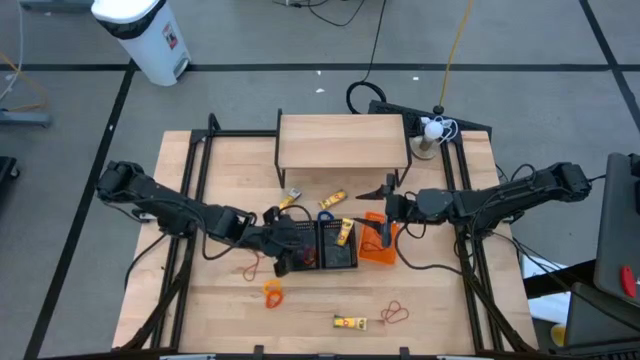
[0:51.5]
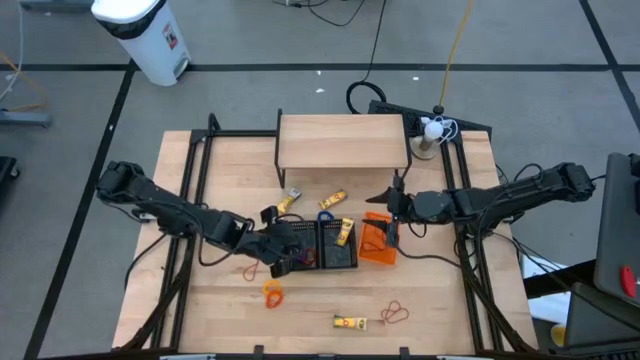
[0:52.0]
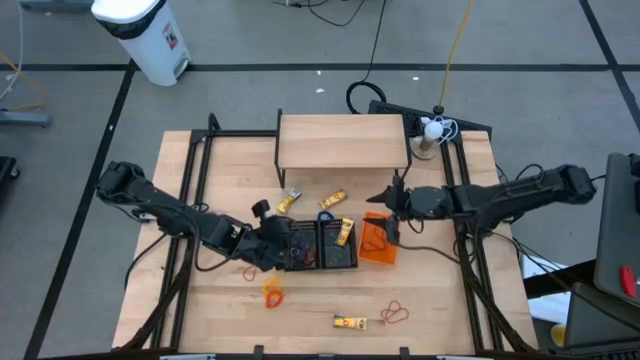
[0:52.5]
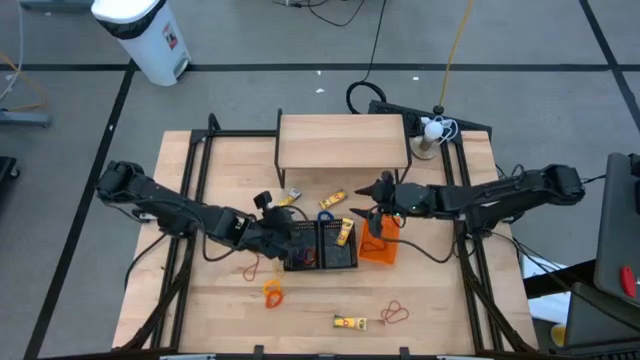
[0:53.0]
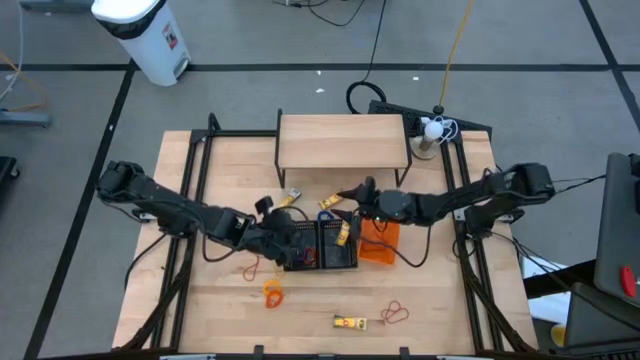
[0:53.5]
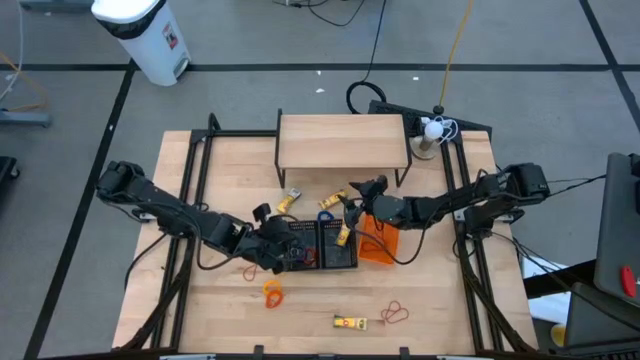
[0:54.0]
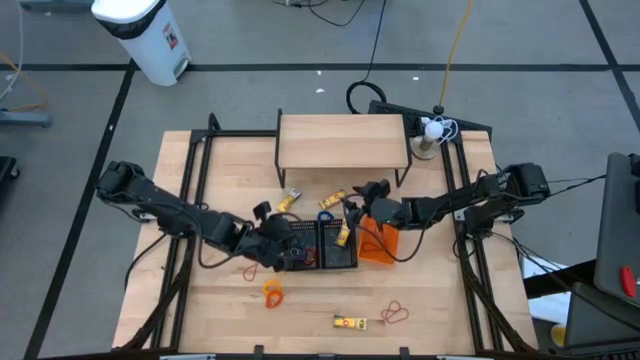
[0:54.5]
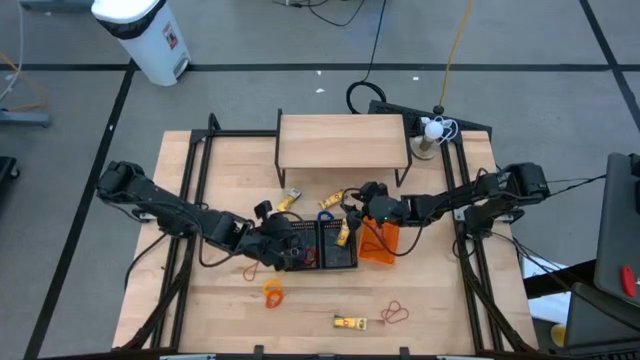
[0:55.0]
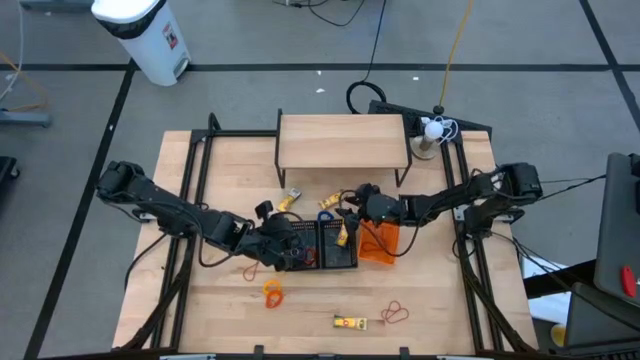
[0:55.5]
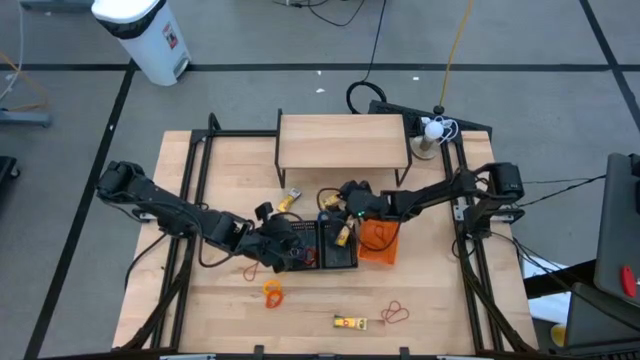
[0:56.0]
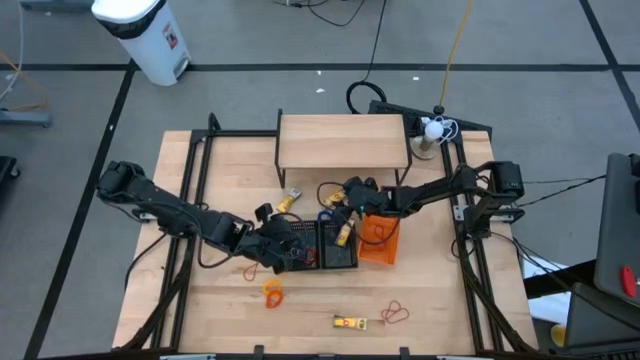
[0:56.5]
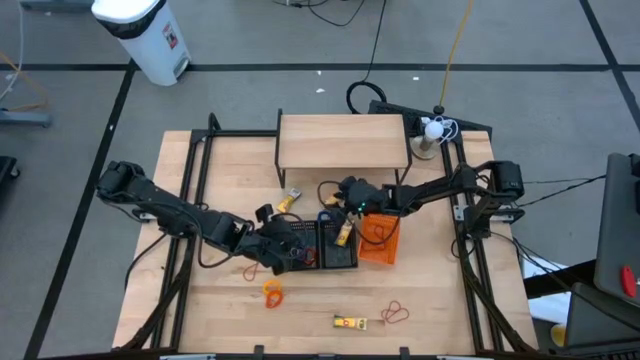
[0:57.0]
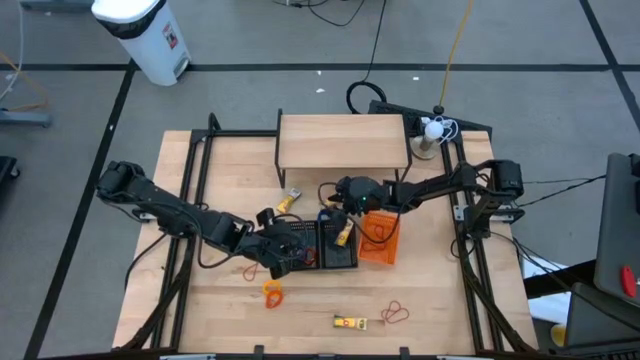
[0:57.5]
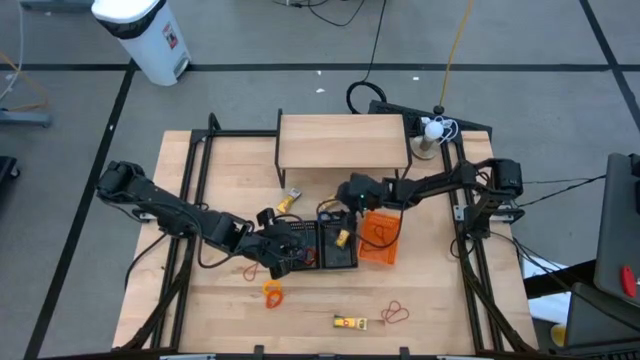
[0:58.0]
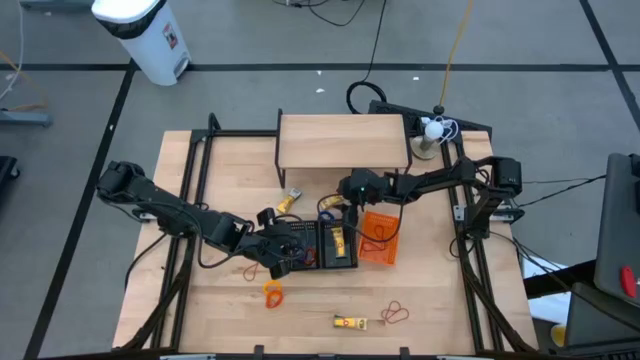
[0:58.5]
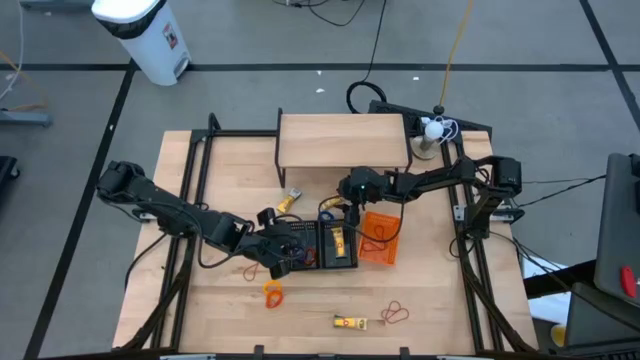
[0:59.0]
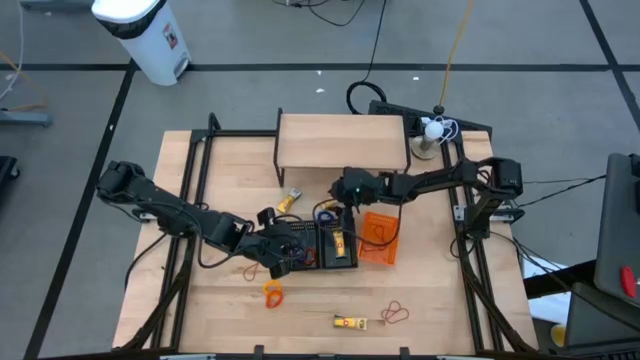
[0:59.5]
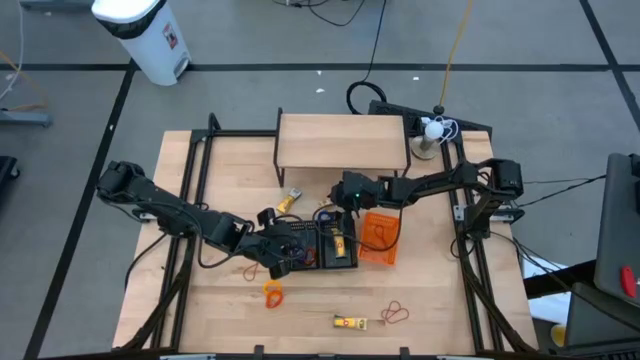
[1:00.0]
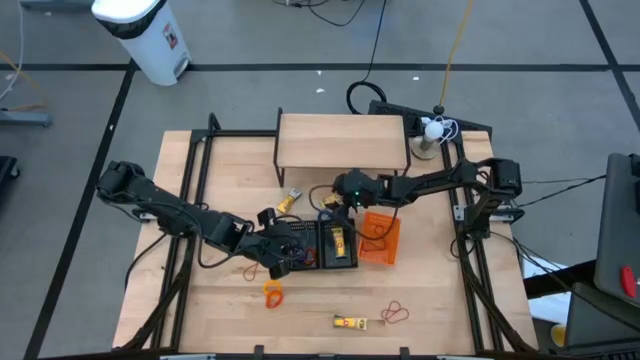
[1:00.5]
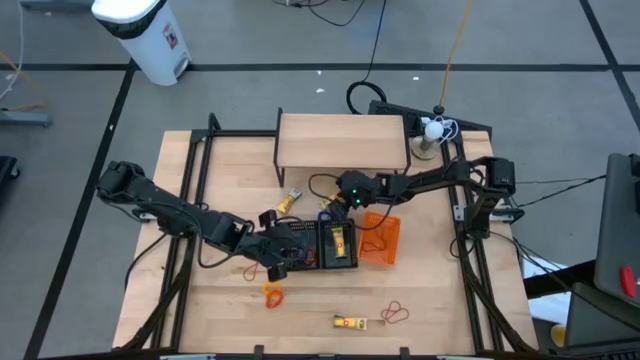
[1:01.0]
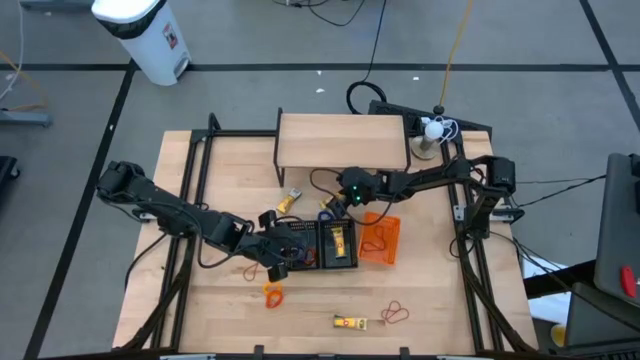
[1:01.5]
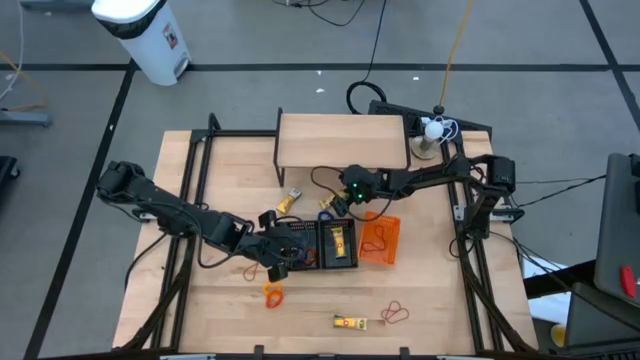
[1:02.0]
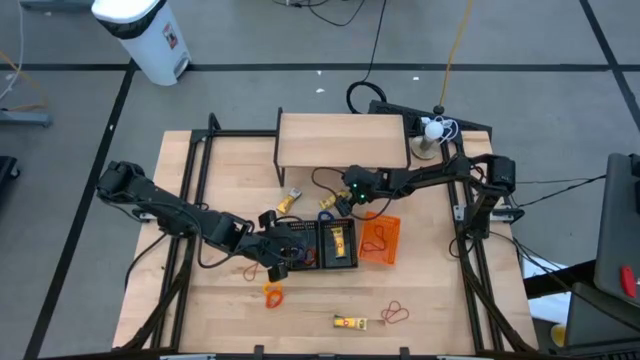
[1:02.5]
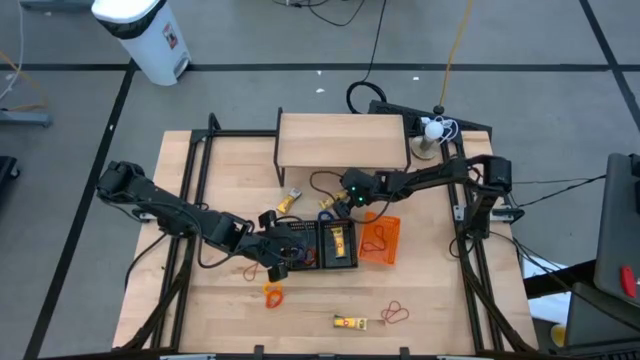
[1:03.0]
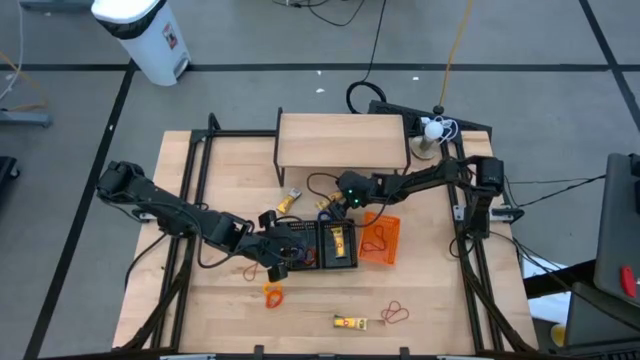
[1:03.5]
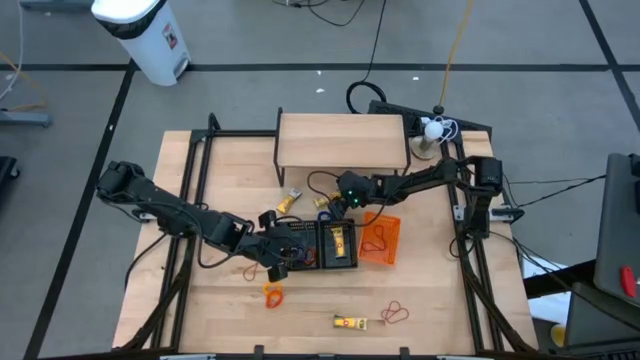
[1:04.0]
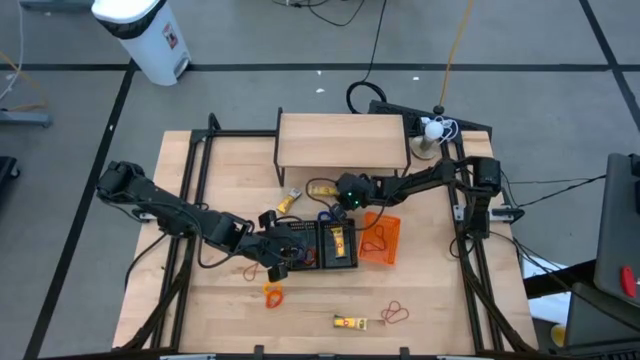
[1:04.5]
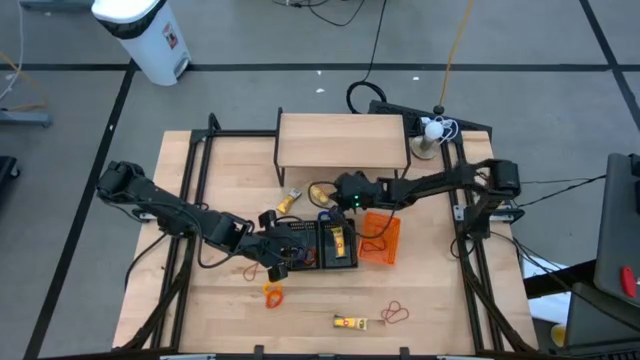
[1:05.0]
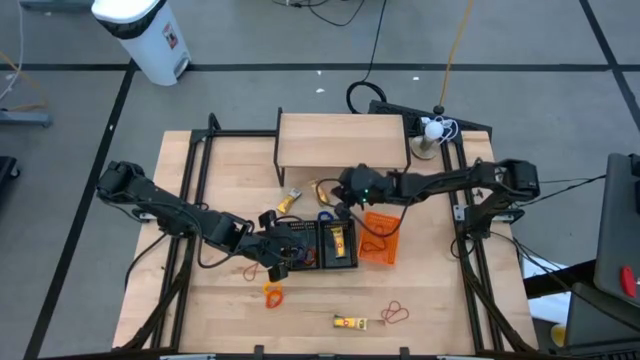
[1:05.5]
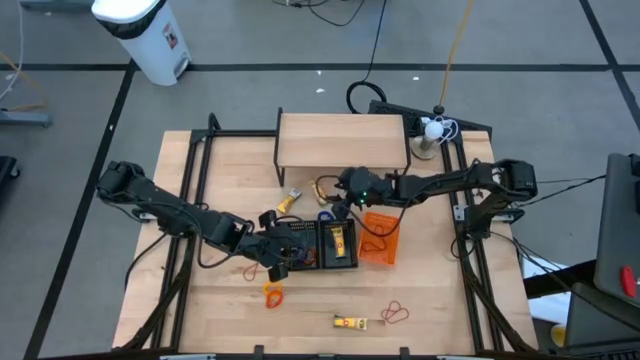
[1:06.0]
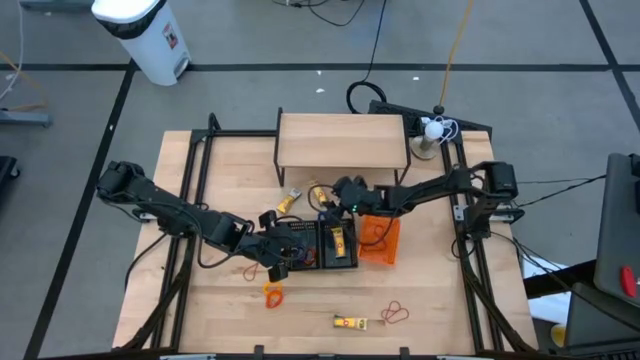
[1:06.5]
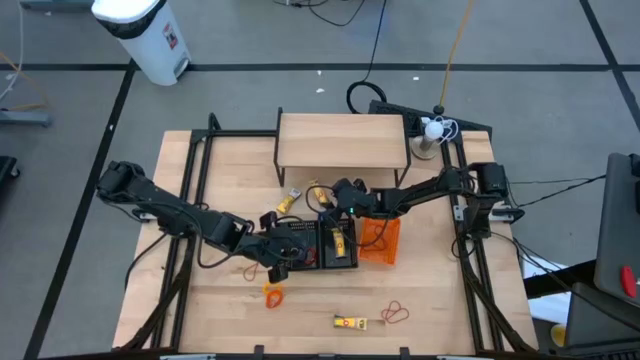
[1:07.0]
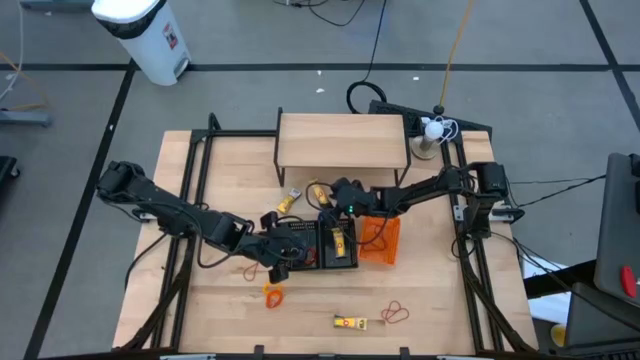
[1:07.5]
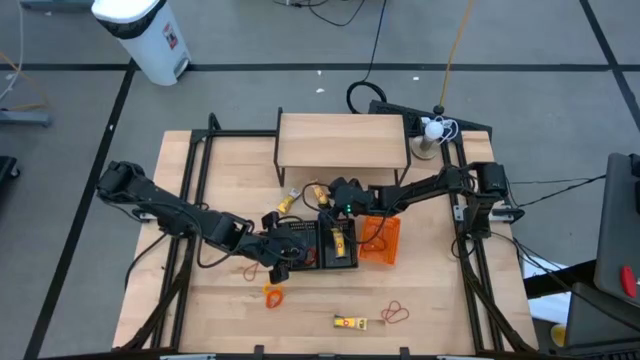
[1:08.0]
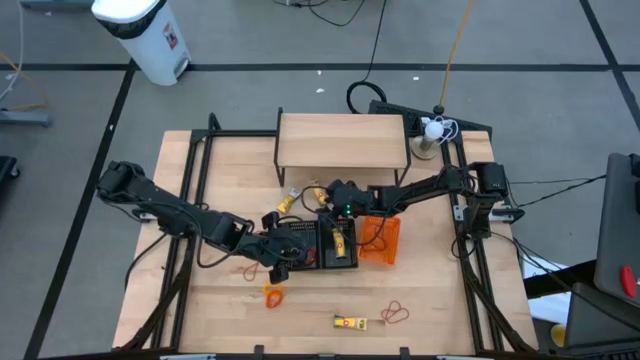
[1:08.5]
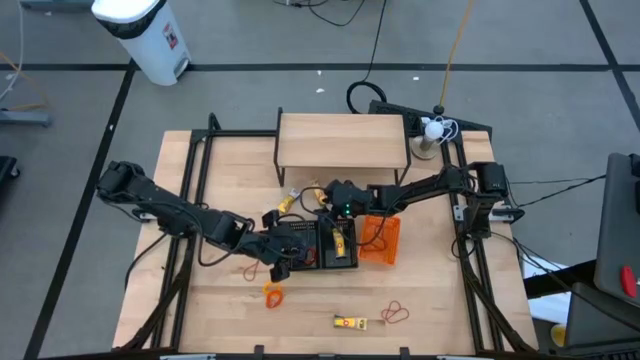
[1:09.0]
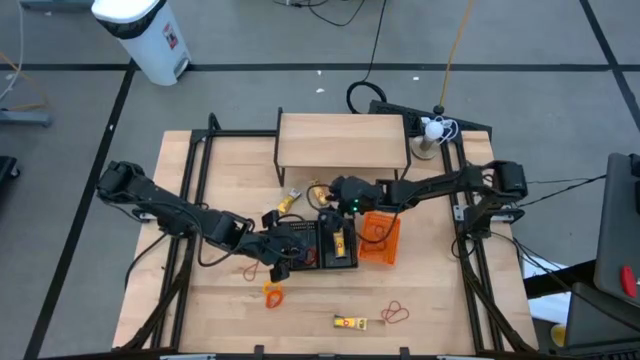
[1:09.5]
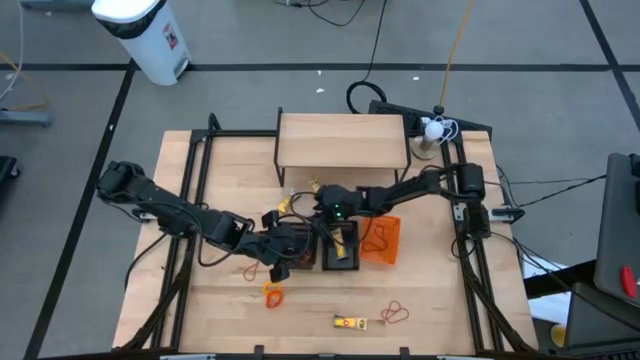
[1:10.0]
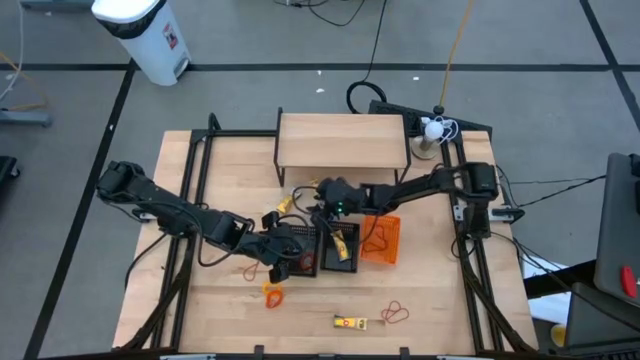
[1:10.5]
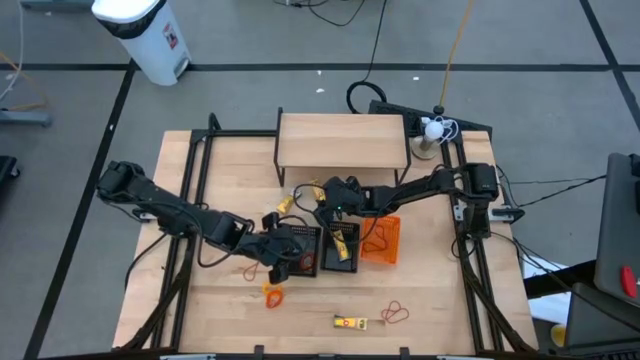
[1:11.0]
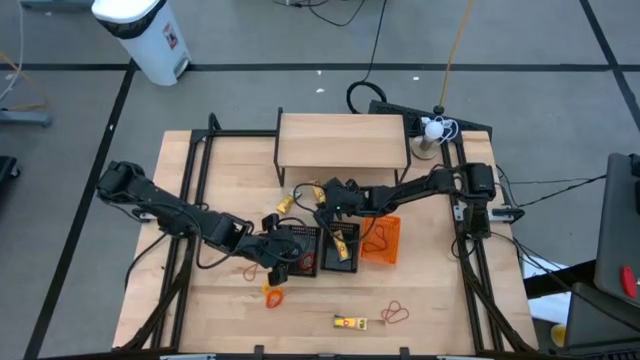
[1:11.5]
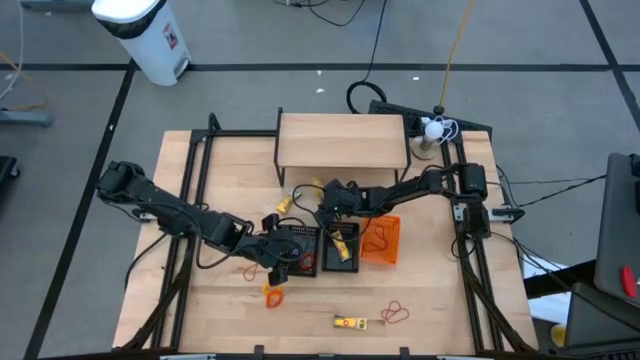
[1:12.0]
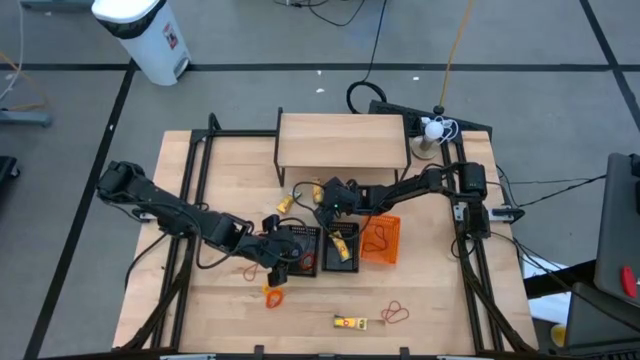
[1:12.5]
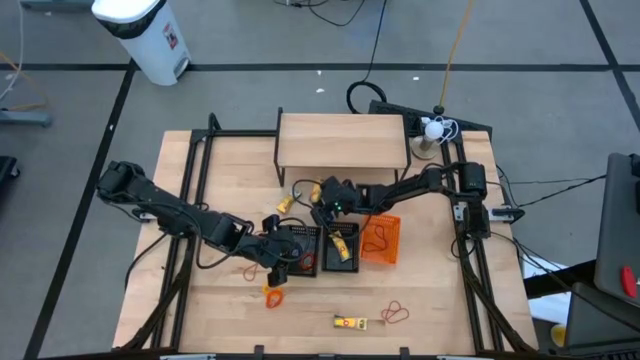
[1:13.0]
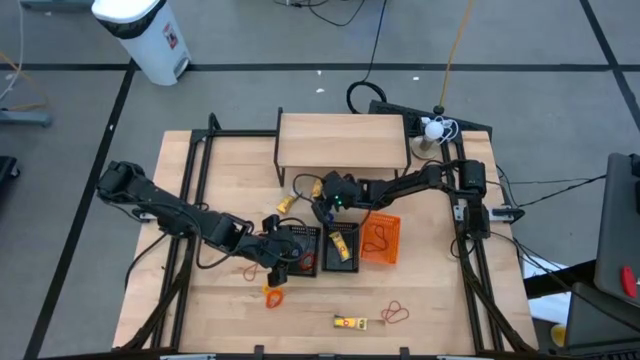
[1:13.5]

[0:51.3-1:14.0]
Task: Pick & Place Office Desk Supplies
Put the crayon box into the right black basket

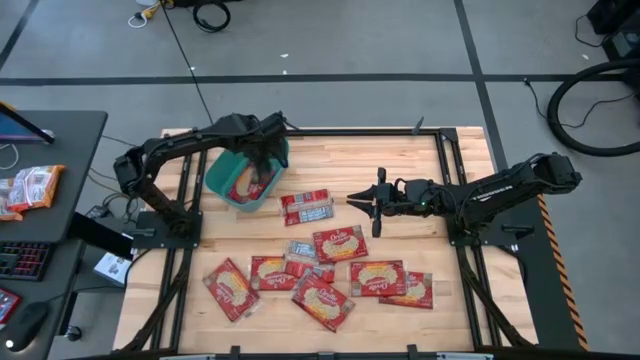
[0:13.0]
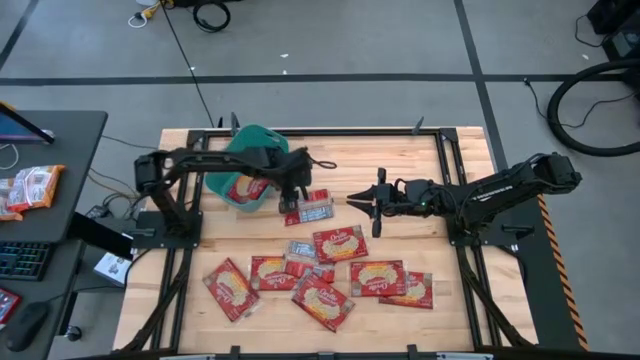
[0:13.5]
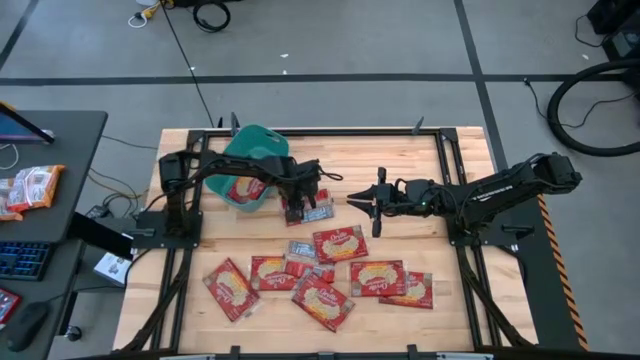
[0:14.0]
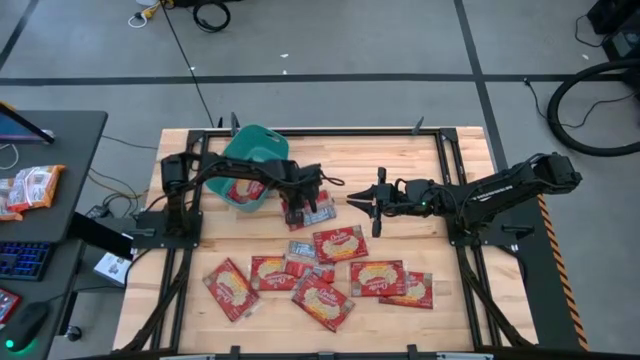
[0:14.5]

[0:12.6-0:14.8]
Task: Sort popcorn bags into baskets
Put the red popcorn bag into the green bin
